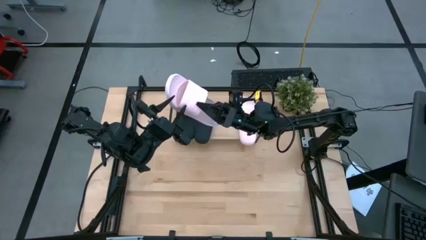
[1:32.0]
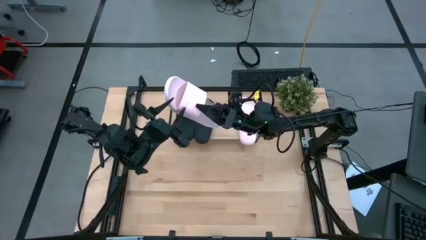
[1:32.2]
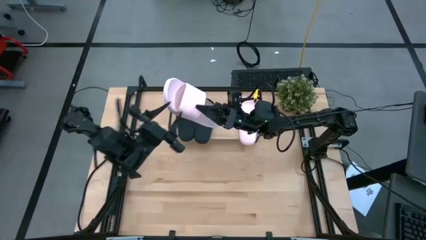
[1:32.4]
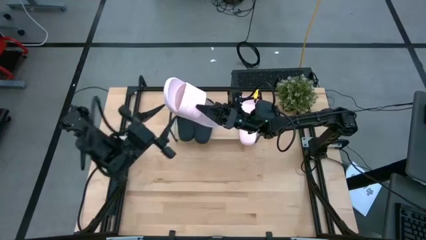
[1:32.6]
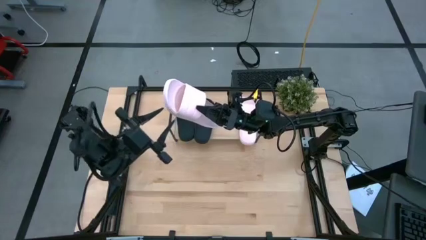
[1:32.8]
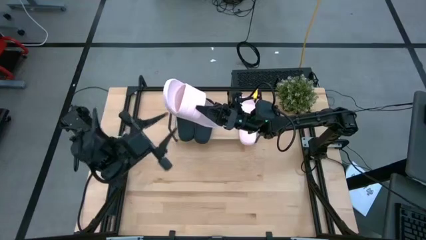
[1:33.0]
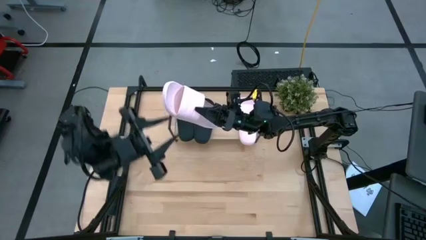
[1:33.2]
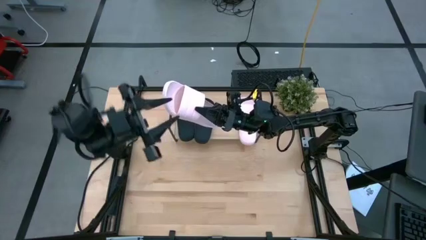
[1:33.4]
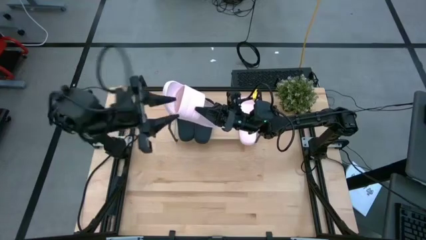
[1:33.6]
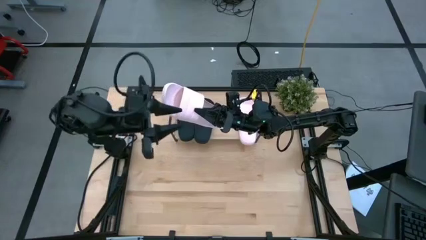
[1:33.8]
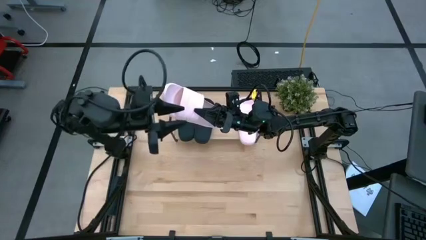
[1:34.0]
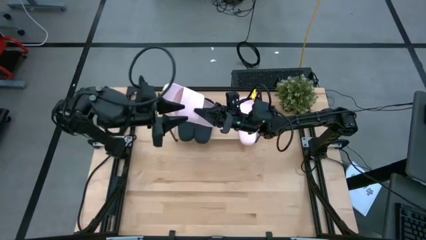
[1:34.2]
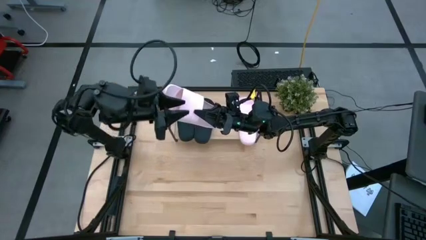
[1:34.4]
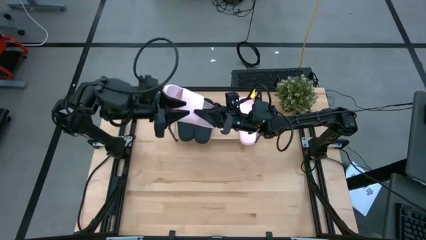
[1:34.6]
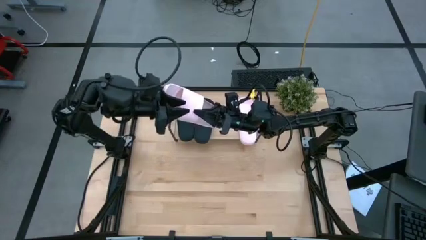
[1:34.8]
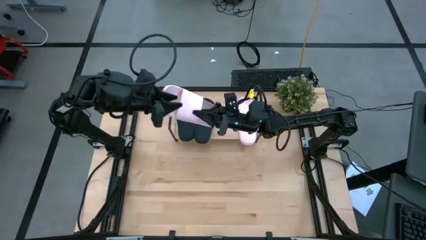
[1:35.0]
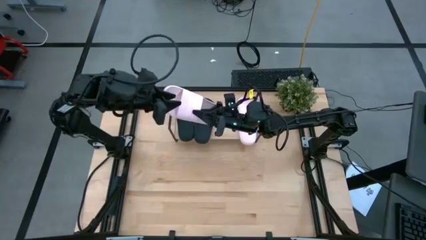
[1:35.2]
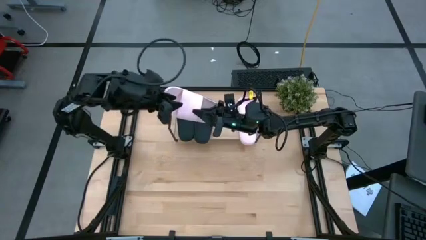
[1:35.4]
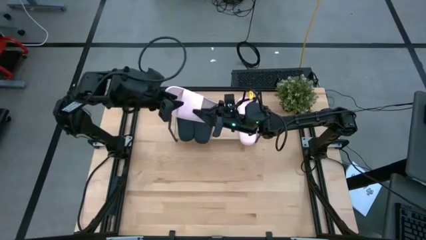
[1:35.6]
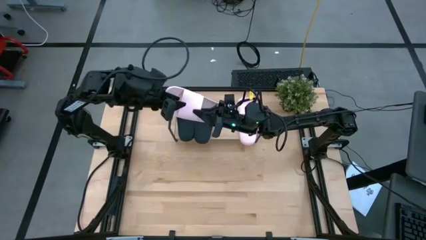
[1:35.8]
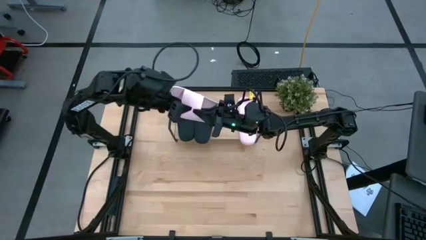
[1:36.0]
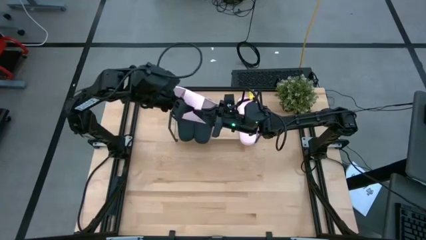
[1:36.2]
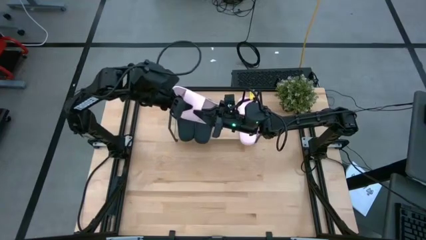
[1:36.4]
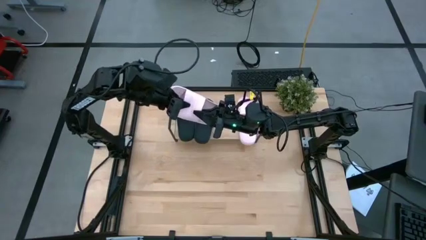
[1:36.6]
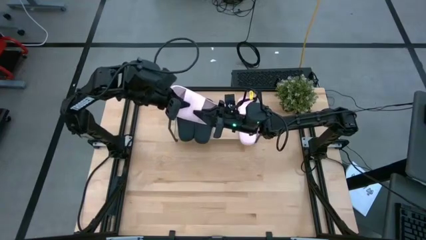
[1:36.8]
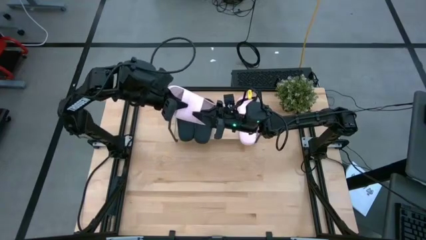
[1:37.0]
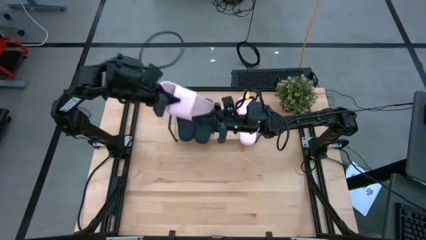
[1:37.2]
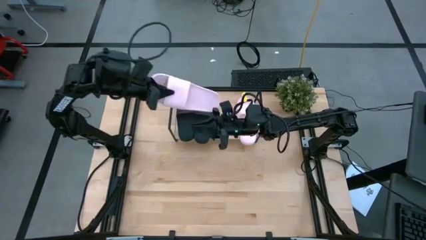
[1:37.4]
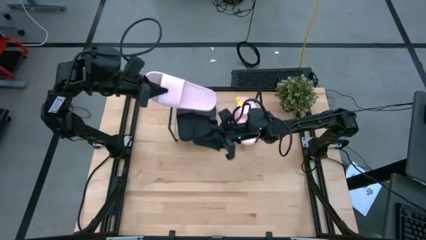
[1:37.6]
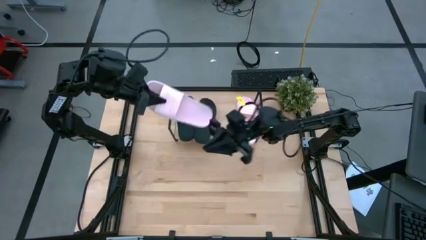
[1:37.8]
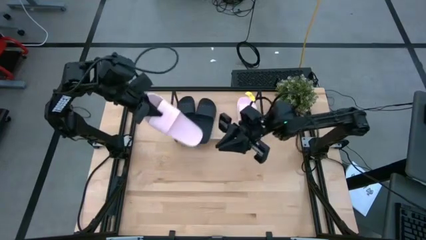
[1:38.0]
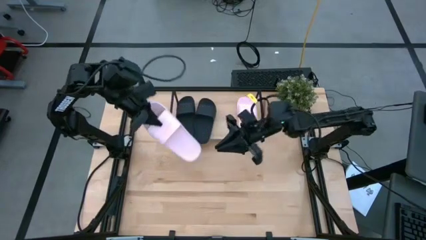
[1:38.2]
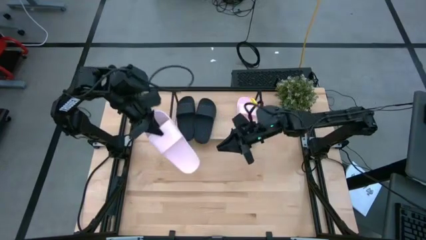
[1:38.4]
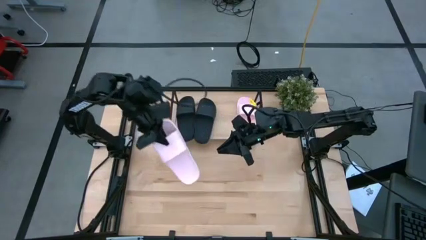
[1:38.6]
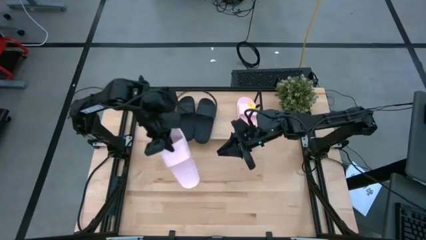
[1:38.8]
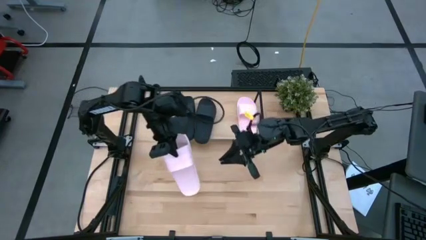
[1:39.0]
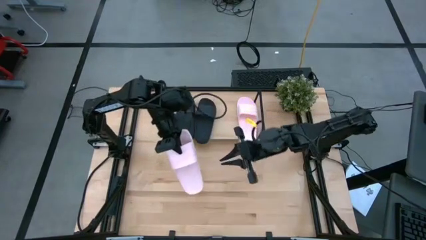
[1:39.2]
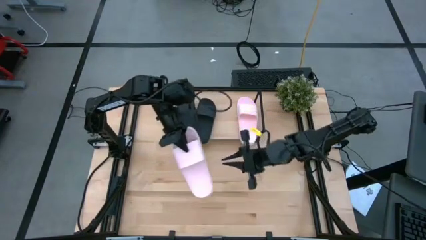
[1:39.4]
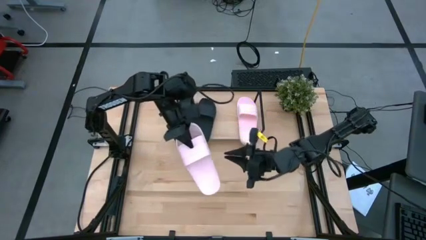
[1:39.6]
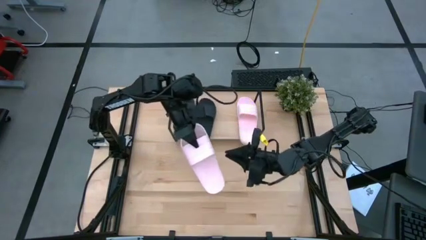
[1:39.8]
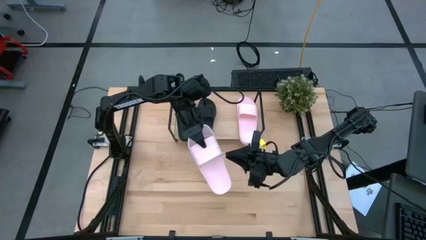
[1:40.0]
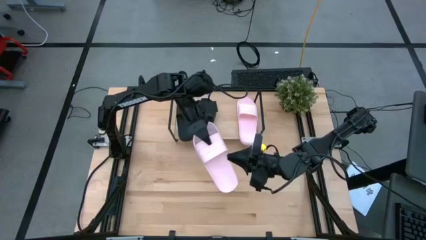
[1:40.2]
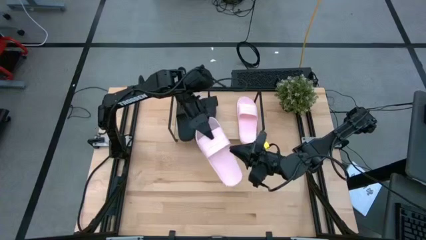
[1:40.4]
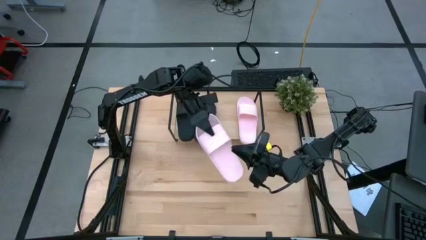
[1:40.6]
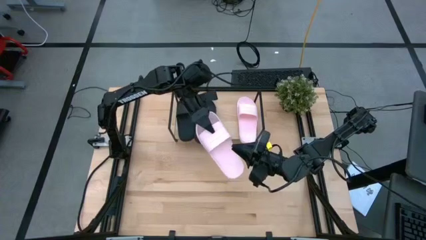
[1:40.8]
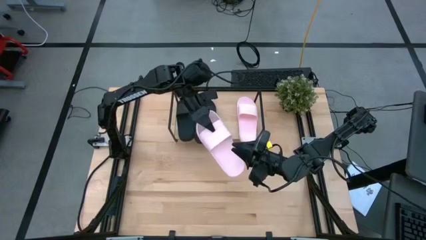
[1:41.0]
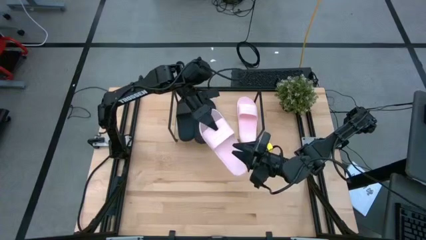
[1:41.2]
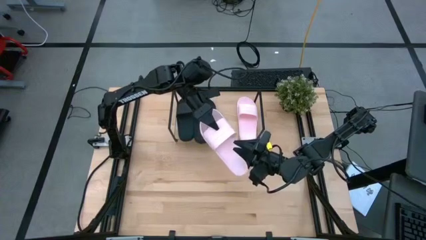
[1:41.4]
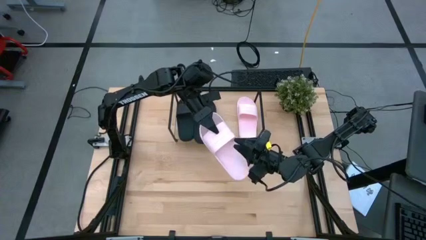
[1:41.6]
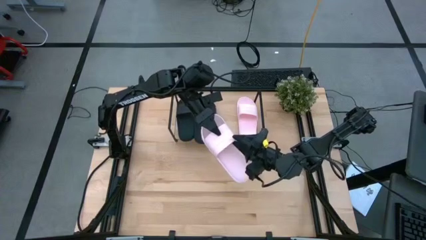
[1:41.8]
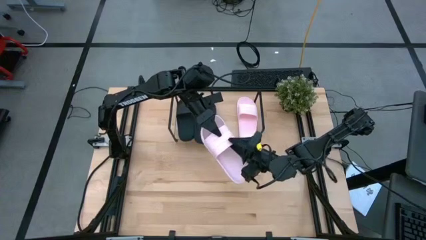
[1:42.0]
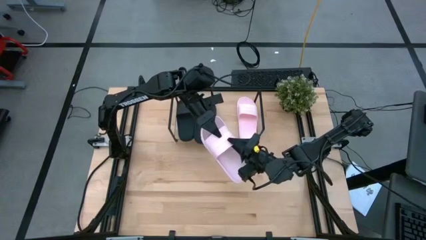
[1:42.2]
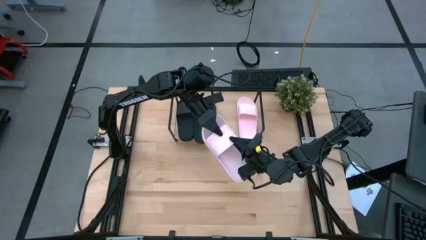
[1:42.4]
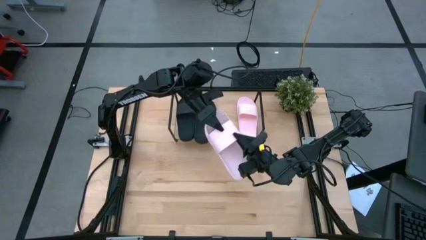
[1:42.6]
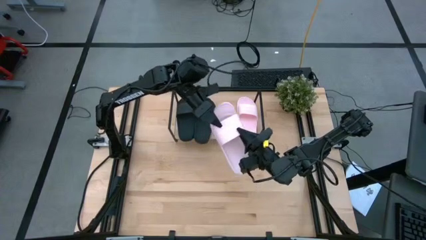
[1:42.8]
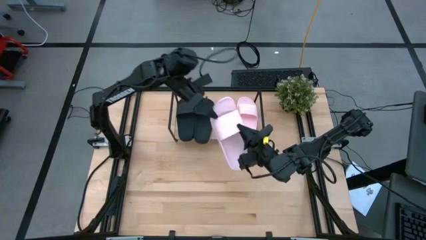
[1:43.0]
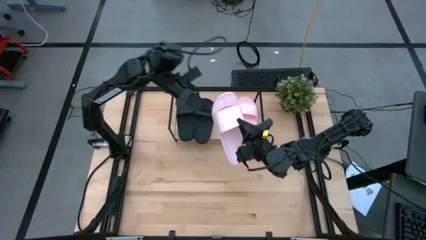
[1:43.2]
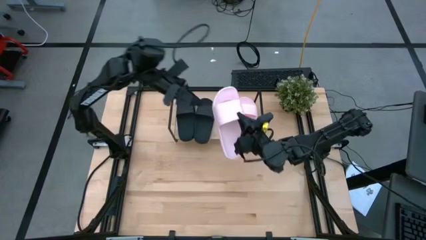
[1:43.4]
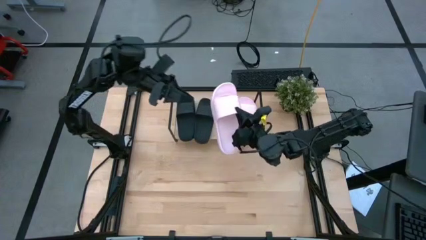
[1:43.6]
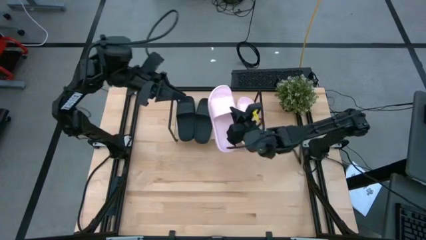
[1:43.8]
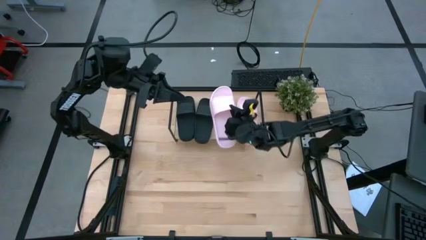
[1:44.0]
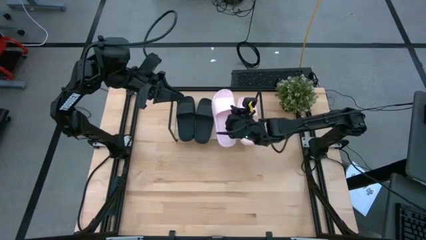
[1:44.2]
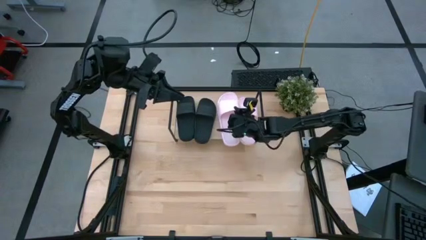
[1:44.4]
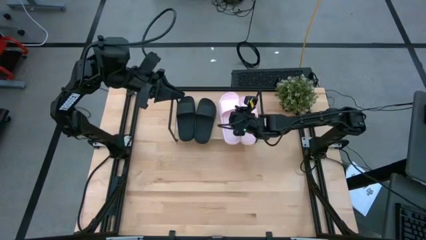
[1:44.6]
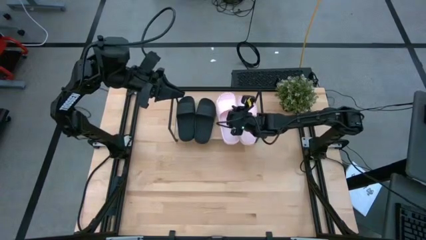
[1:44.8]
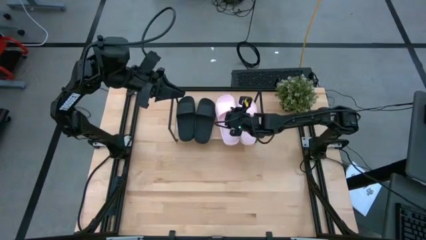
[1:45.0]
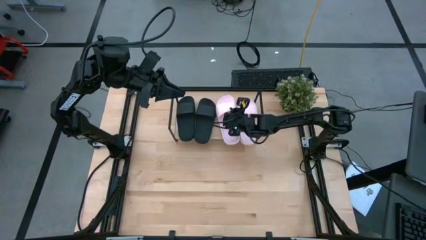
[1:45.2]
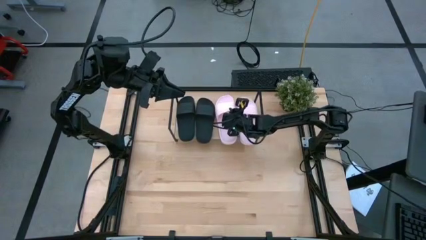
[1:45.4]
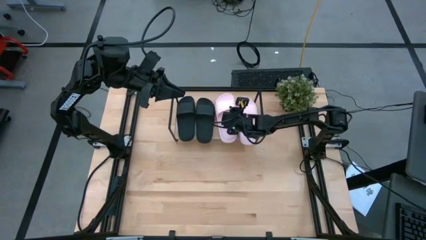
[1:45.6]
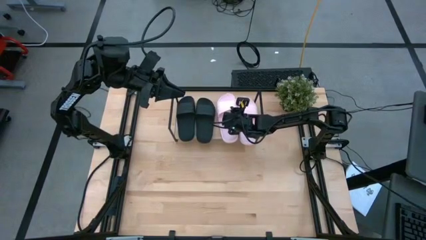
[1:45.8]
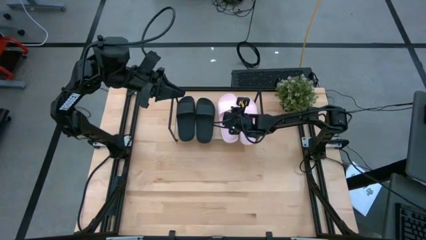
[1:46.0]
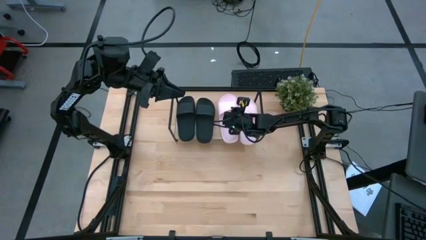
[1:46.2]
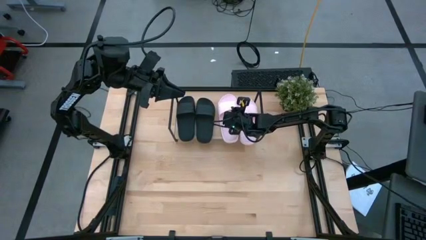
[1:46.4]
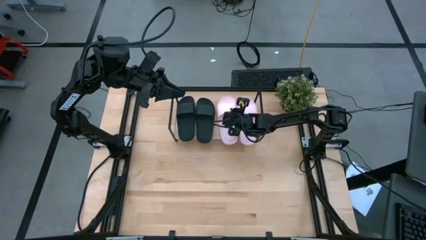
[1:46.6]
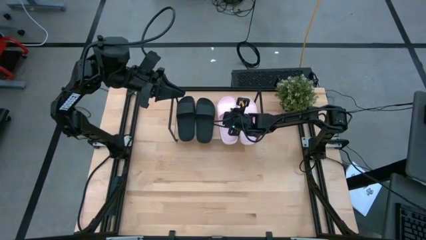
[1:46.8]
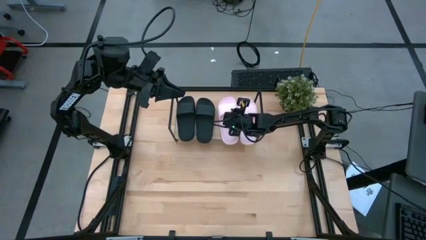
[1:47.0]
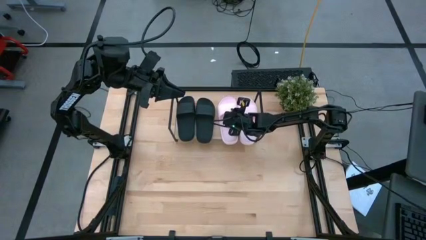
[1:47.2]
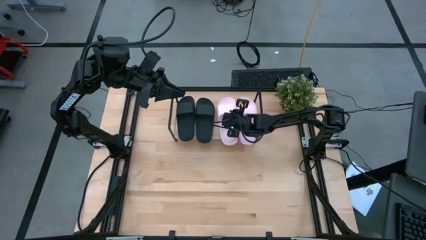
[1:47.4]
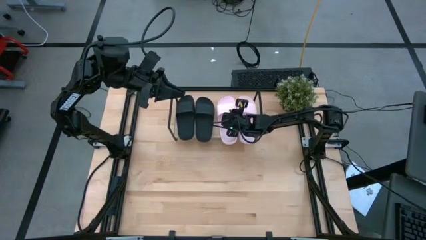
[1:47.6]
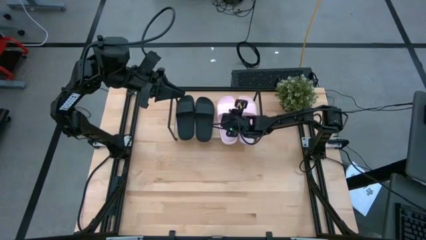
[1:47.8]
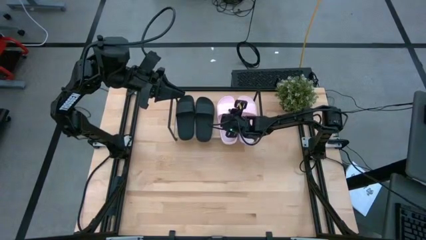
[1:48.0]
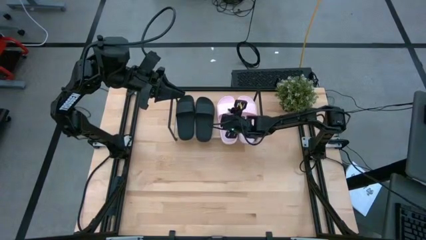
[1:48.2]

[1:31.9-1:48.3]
Task: Pick and place slides into the shelf
Put the pink slide on the shelf
